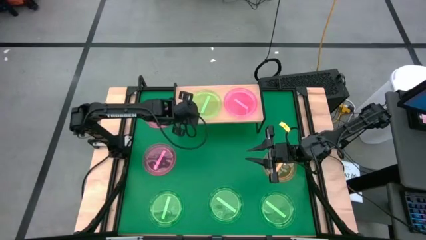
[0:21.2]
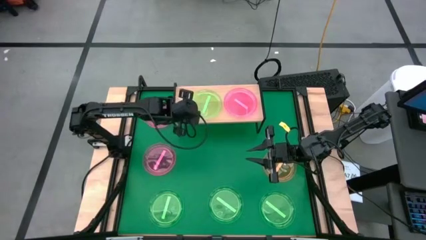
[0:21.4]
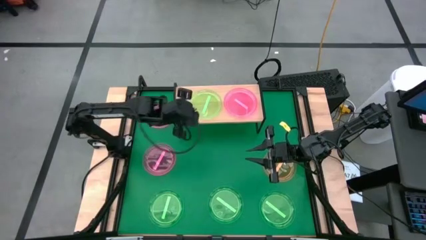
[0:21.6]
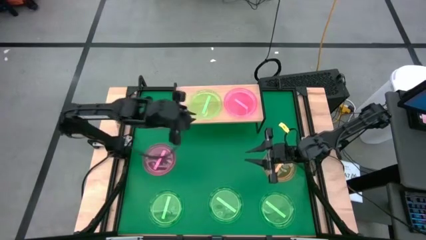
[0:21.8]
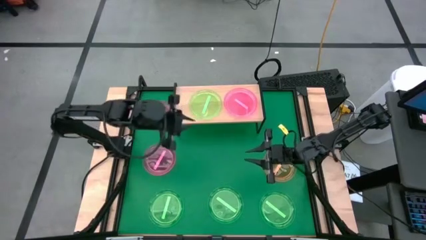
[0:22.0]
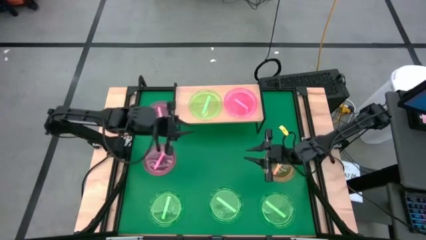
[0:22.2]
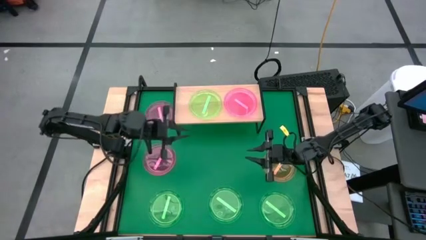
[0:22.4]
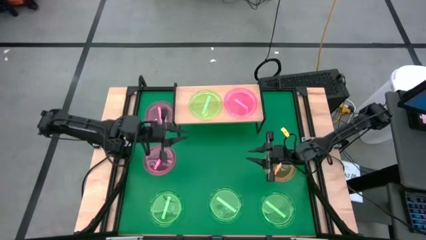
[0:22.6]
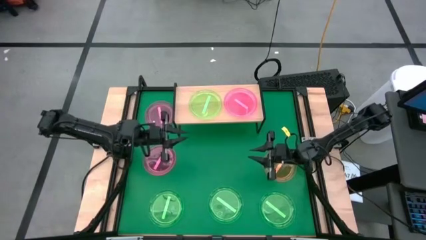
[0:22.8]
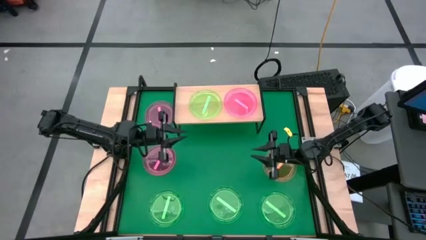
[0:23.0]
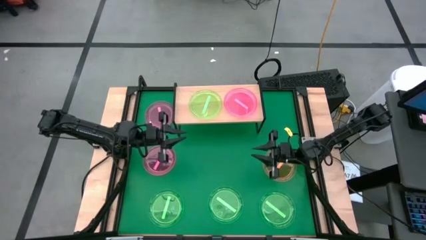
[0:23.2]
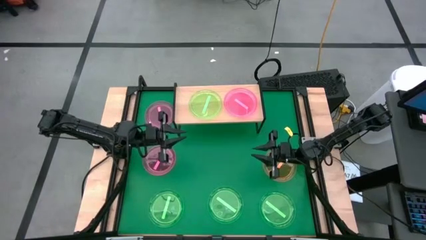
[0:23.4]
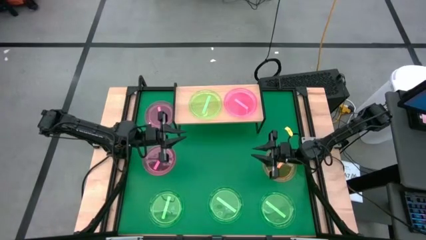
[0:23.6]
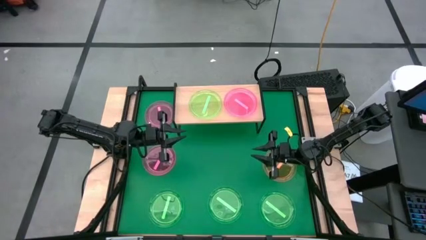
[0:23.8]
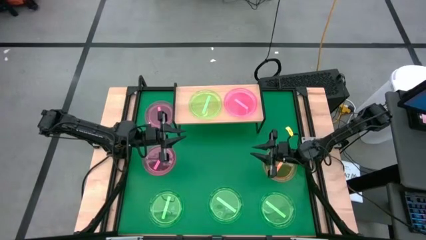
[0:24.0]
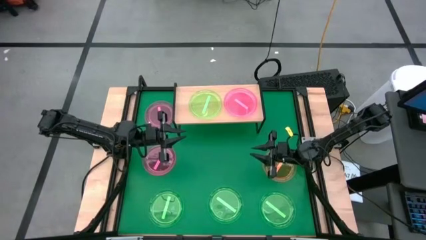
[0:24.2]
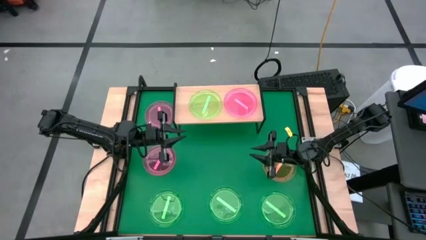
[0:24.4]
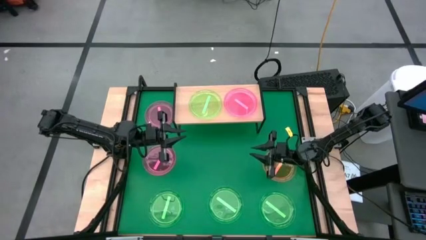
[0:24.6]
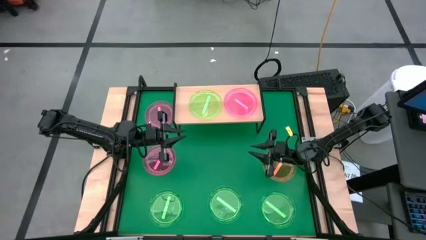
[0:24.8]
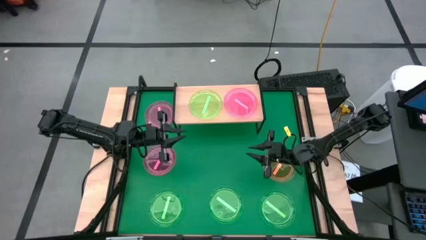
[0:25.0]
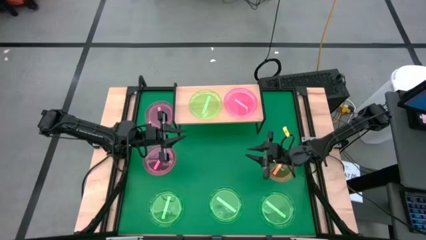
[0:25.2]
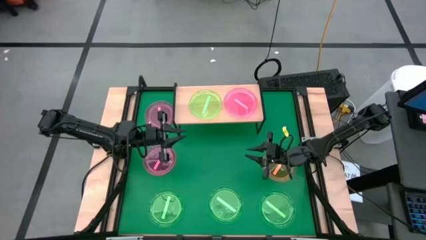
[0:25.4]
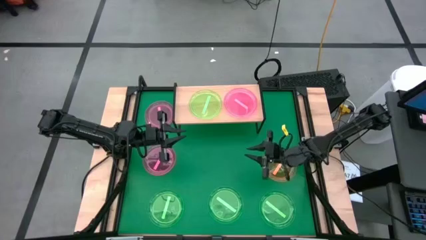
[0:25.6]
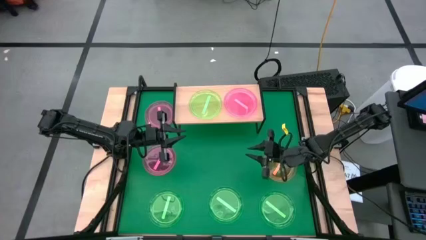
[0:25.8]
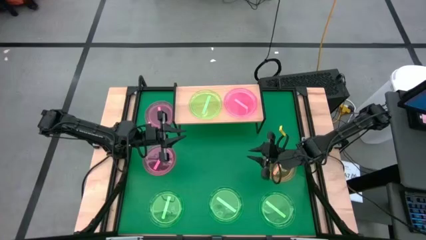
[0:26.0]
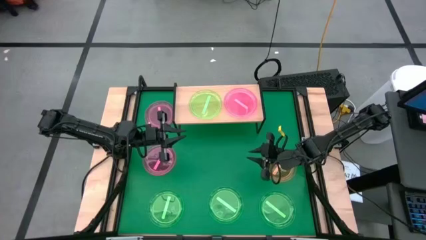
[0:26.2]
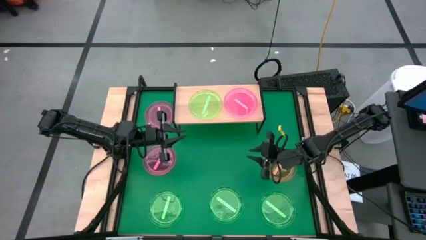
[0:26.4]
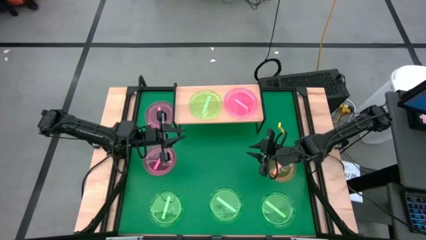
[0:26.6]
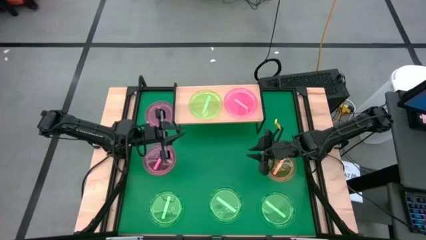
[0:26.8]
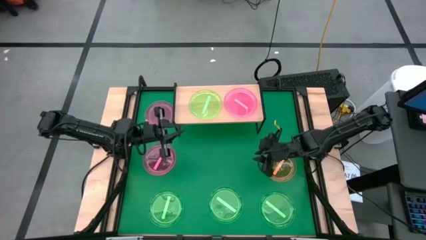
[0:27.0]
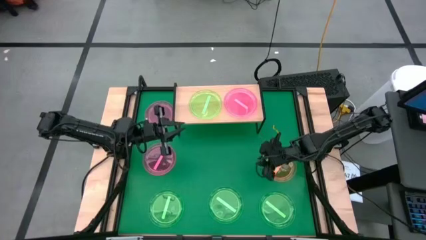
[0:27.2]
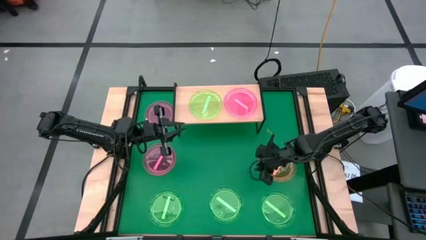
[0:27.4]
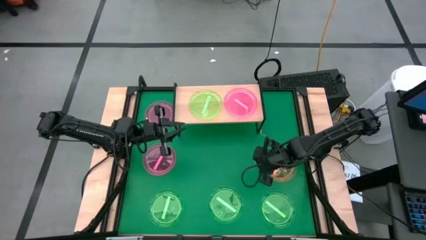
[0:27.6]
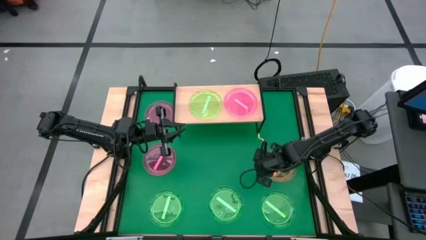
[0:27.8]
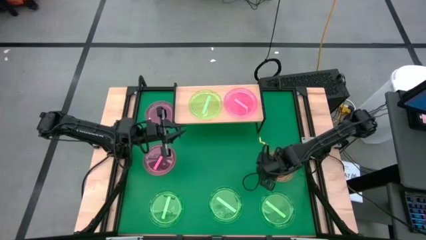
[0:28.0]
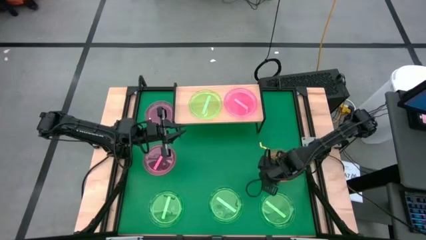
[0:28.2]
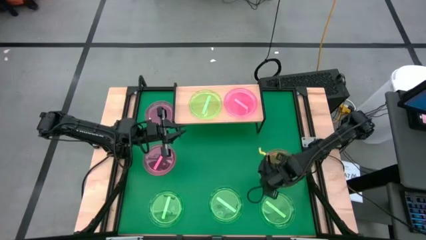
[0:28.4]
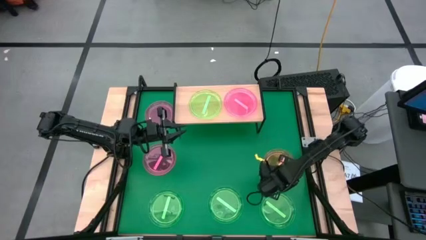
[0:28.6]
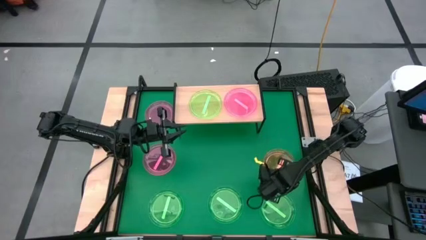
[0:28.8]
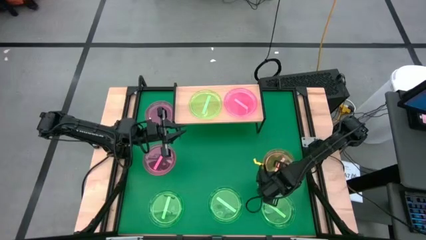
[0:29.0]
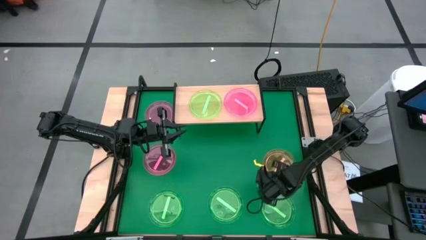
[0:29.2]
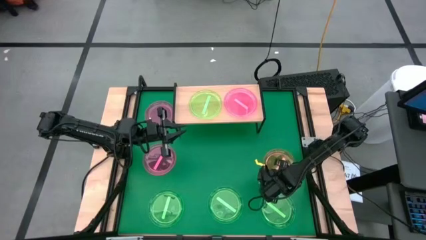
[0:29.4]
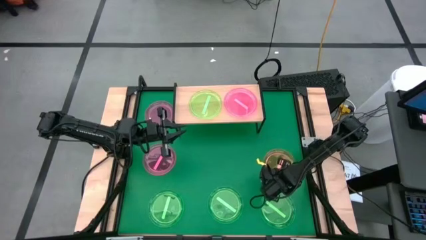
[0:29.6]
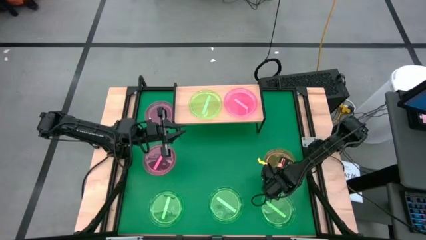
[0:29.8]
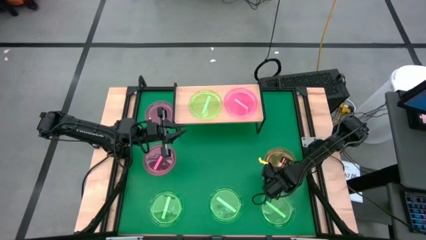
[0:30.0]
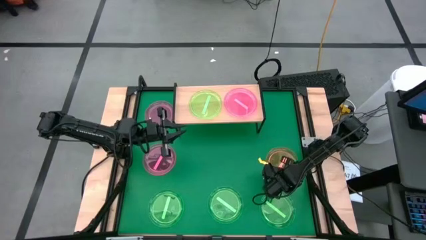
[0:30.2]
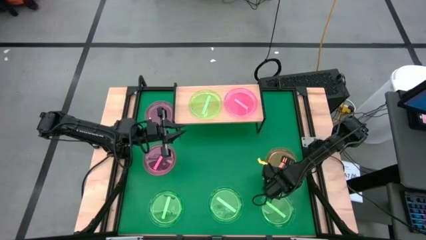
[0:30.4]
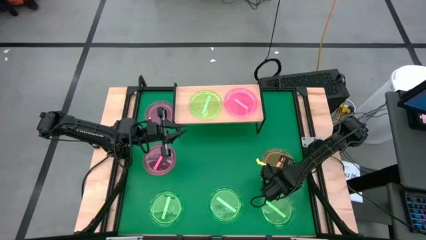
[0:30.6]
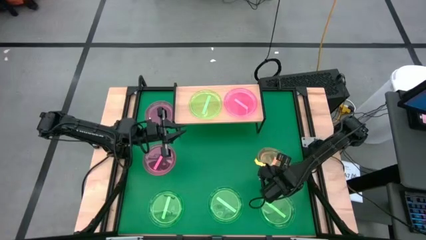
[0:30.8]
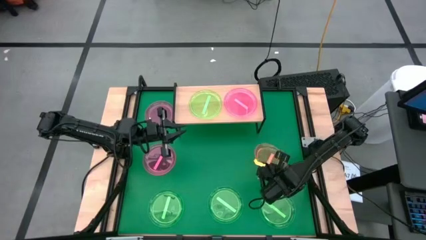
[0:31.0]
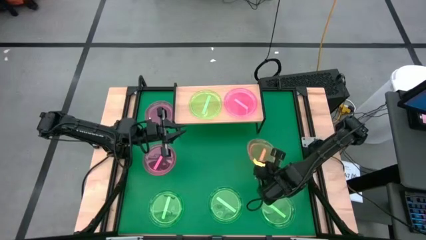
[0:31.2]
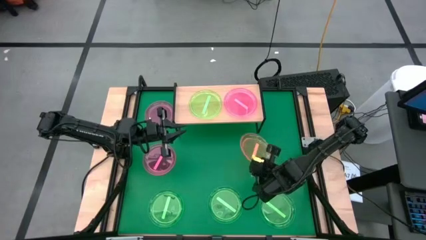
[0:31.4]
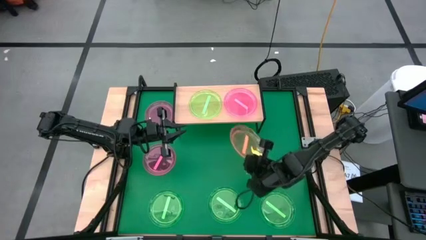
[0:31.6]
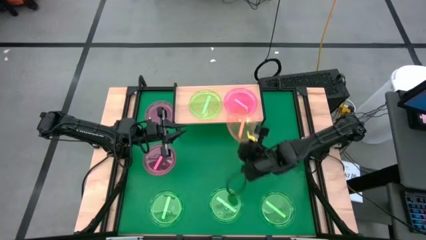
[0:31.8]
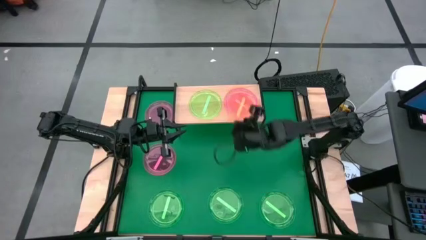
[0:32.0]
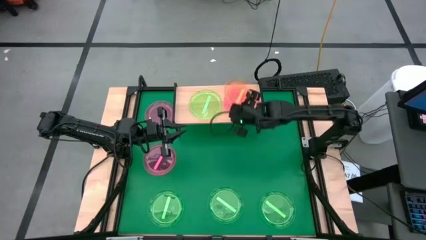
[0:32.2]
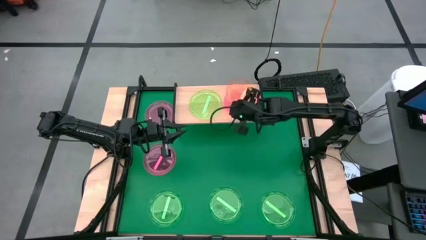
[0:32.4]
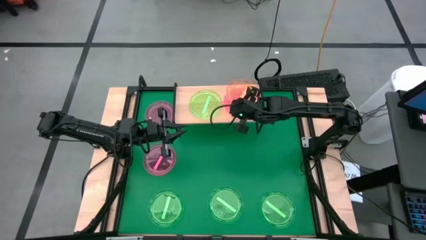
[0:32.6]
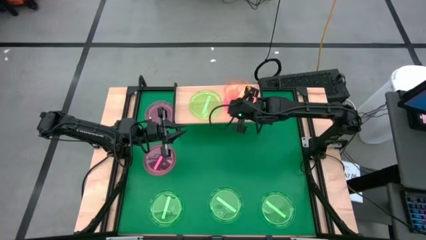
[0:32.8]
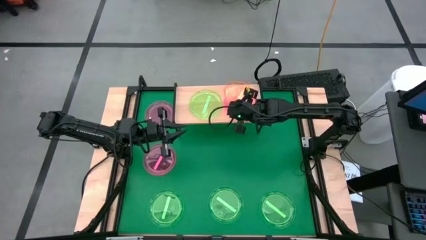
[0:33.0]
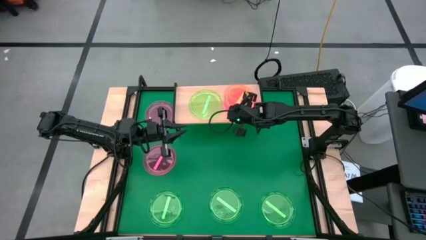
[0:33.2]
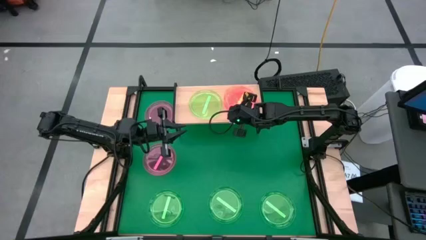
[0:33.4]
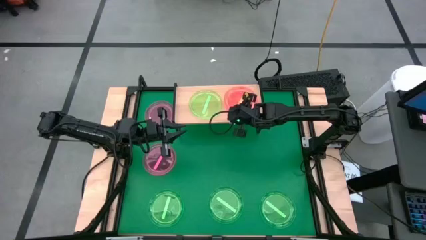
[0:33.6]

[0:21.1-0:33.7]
Task: Place and stack plates onto a shelf
Stack the orange transparent plate on top of the pink transparent plate on the shelf
